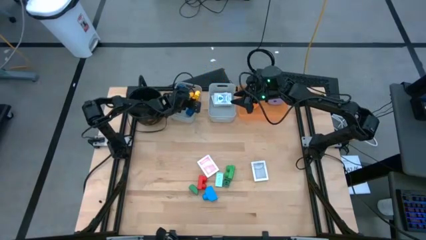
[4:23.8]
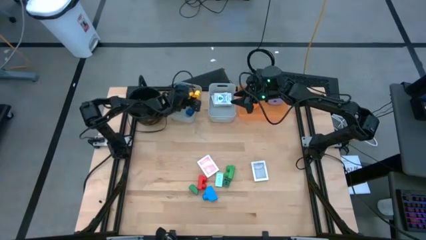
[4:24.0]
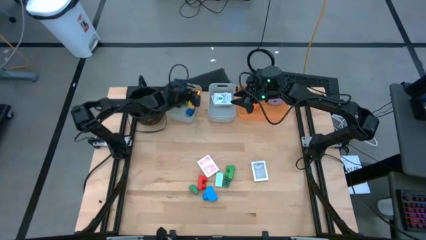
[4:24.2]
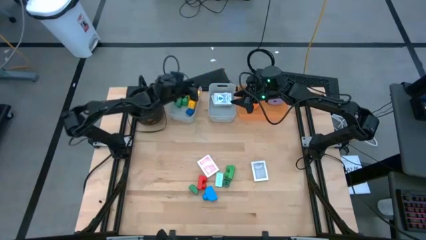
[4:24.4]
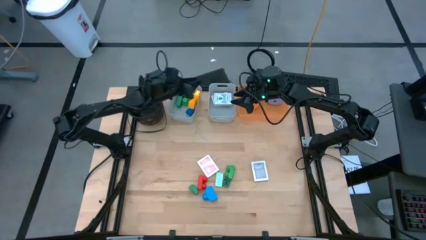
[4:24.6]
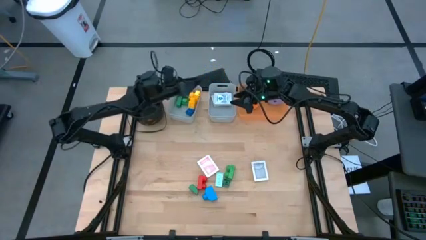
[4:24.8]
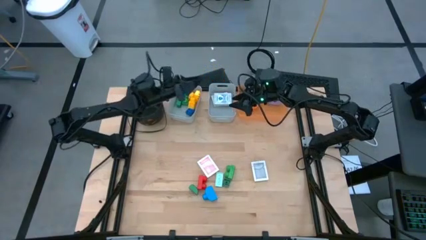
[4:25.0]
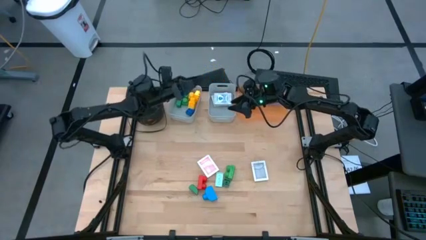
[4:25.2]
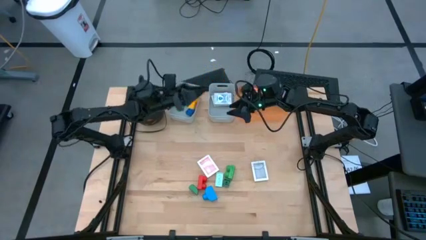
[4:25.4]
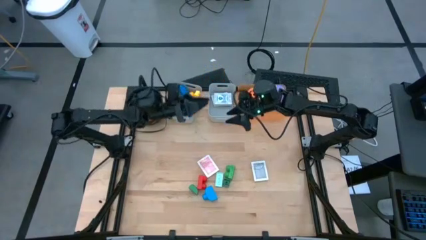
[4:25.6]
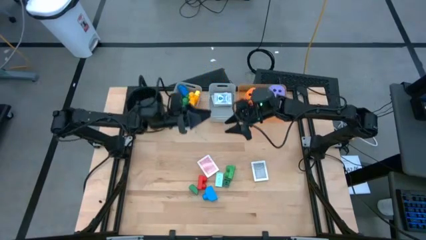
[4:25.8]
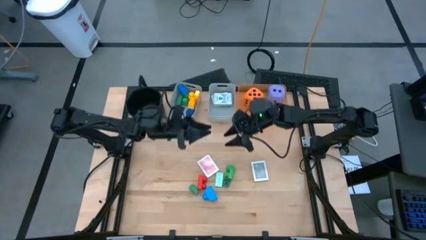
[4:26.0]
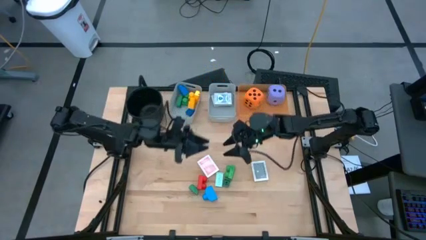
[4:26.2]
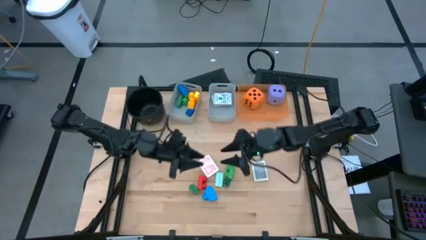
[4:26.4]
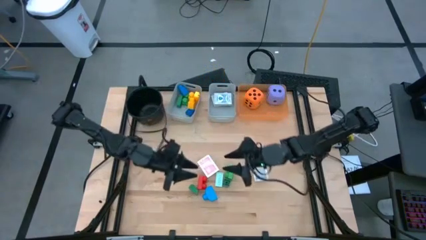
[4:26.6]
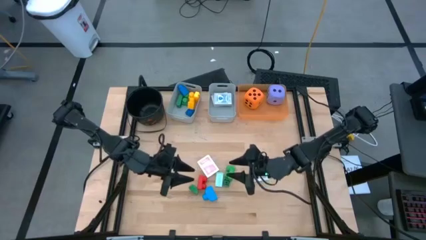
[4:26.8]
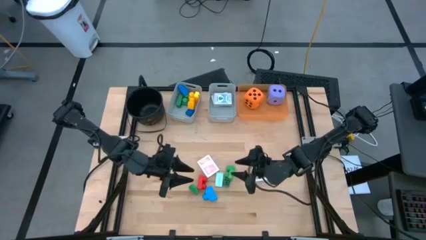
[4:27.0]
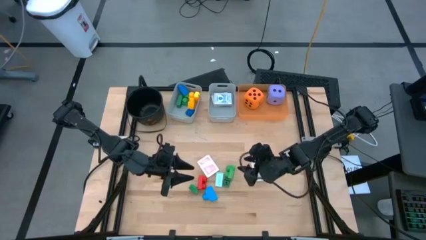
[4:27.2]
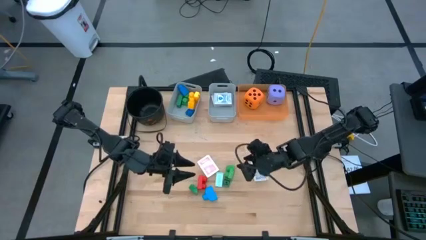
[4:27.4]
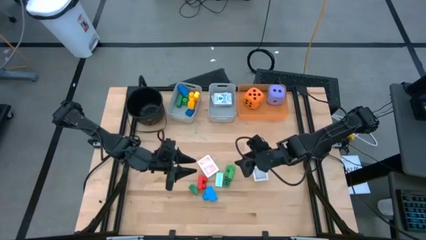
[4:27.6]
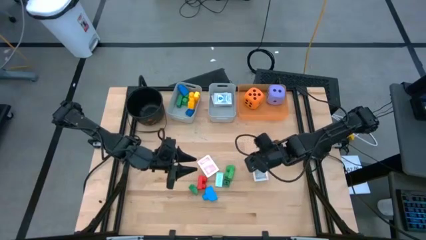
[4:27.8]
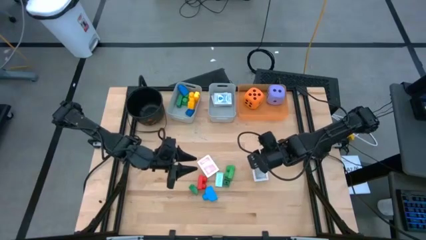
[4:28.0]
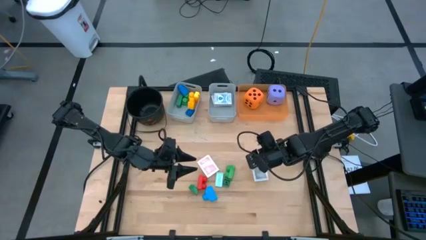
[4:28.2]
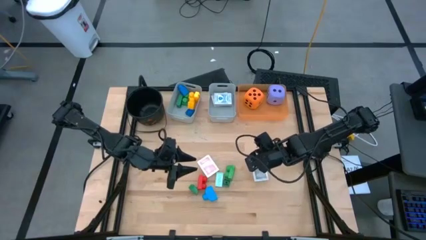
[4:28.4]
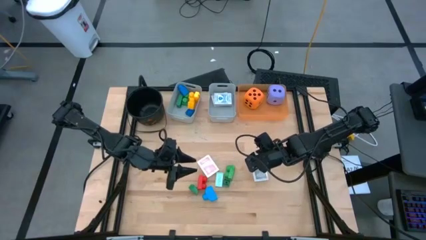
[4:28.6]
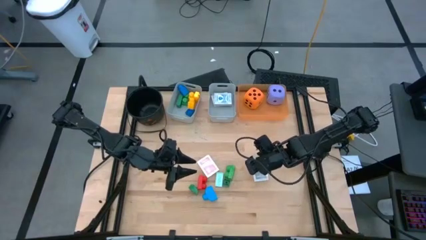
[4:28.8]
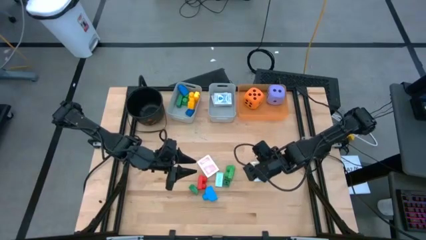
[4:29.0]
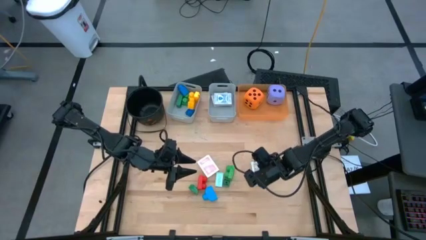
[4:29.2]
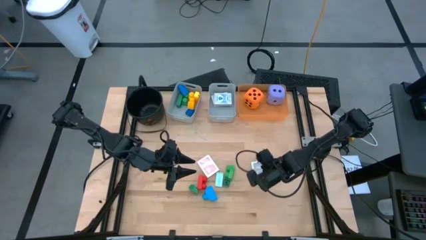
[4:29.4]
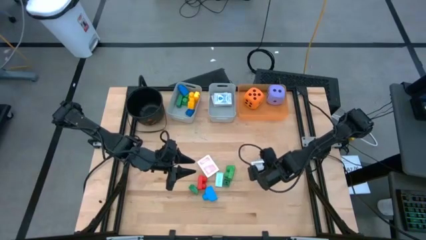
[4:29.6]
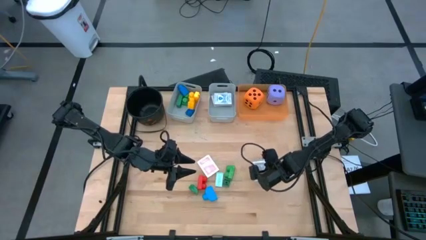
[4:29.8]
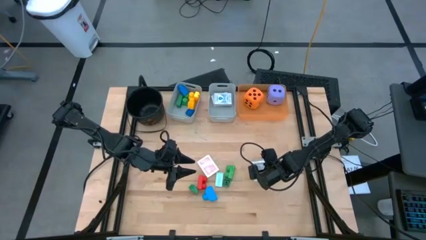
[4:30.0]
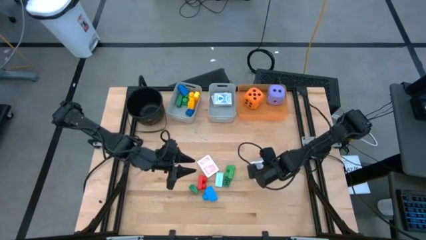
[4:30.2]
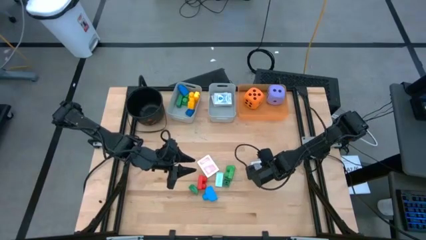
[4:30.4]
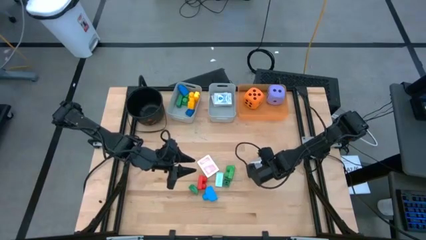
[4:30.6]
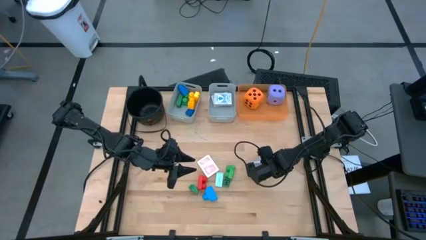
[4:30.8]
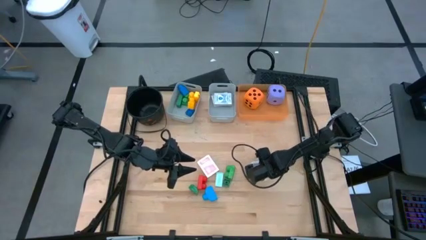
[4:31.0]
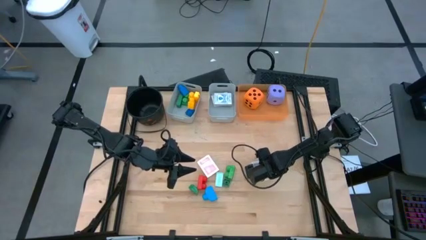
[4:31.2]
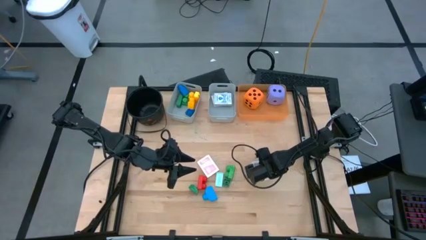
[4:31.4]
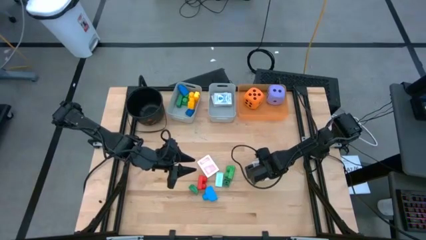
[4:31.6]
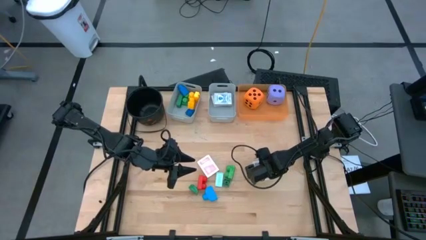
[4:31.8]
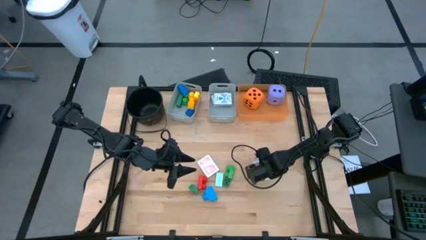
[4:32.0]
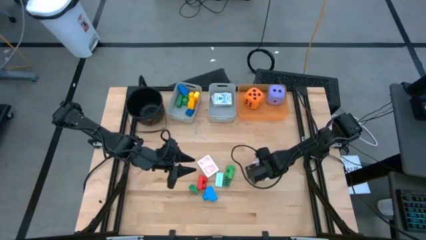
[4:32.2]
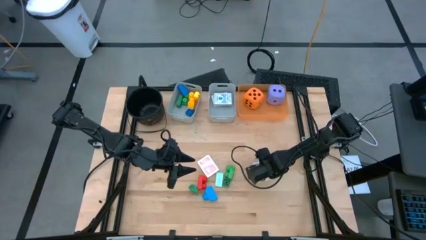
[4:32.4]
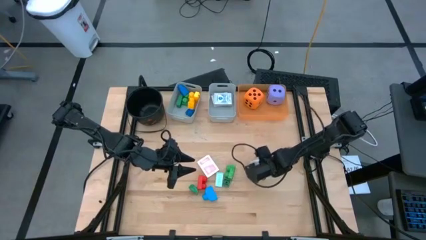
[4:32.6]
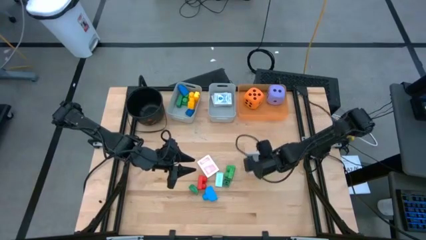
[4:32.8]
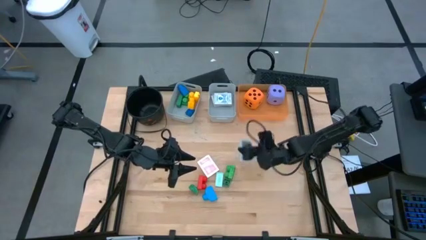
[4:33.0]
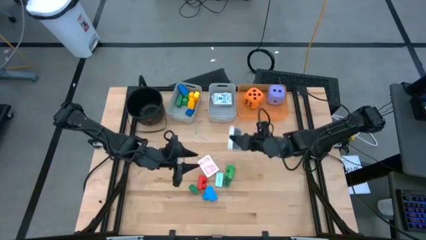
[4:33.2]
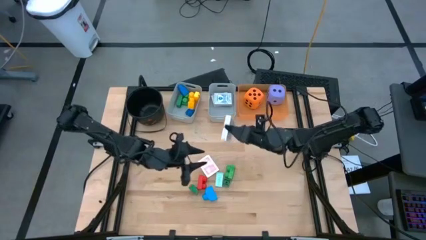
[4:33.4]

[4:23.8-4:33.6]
Task: Pick & Place Toys
Put the black deck of cards into the right gray bin
